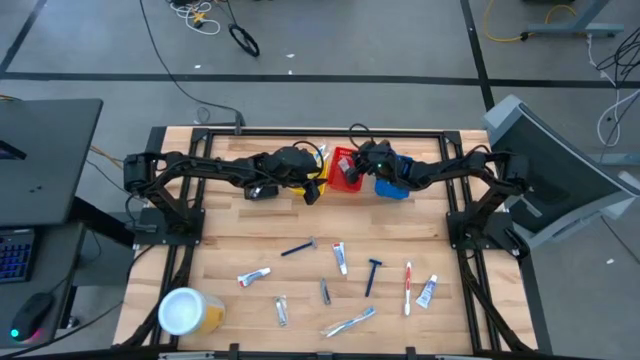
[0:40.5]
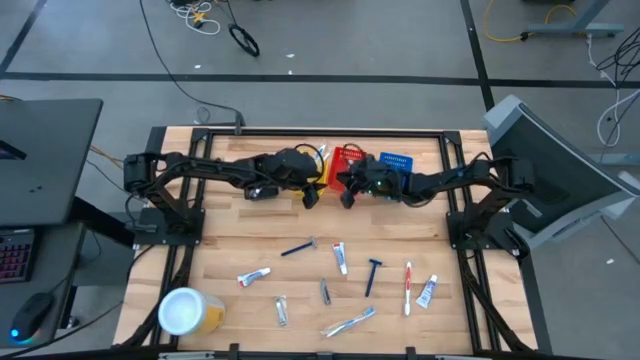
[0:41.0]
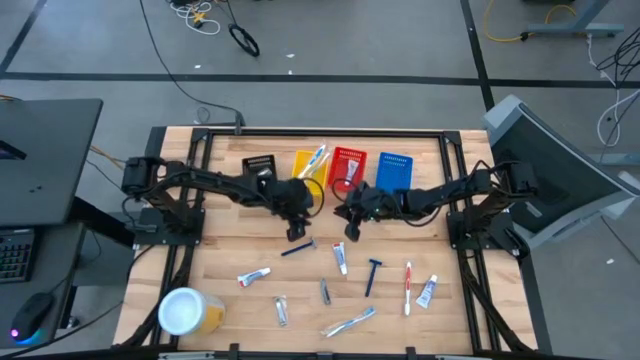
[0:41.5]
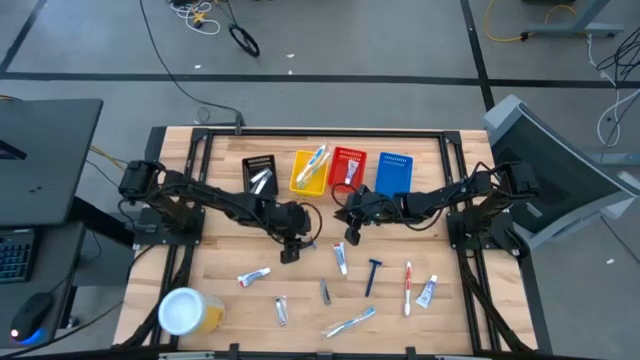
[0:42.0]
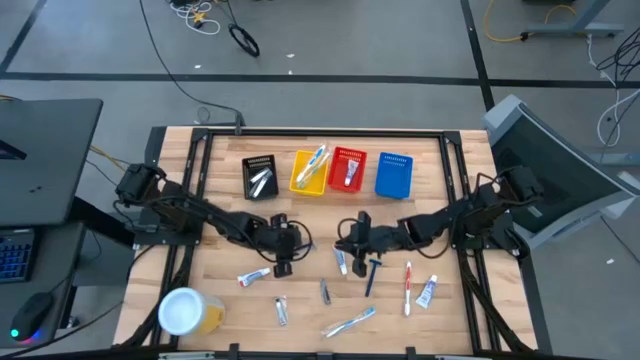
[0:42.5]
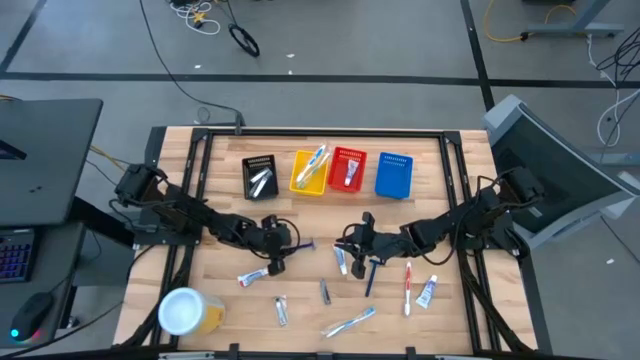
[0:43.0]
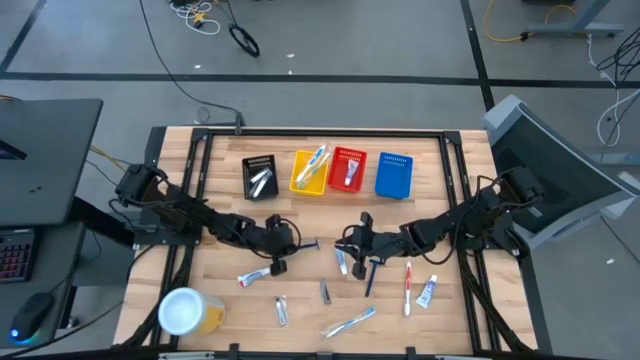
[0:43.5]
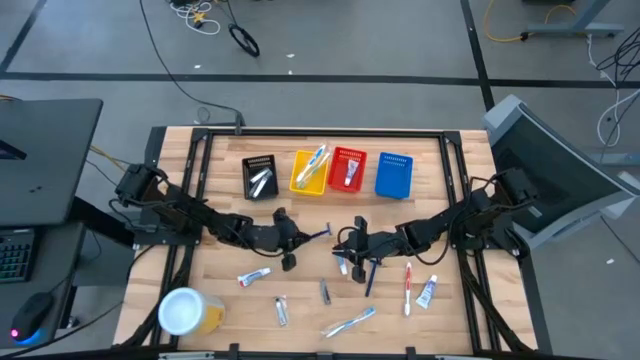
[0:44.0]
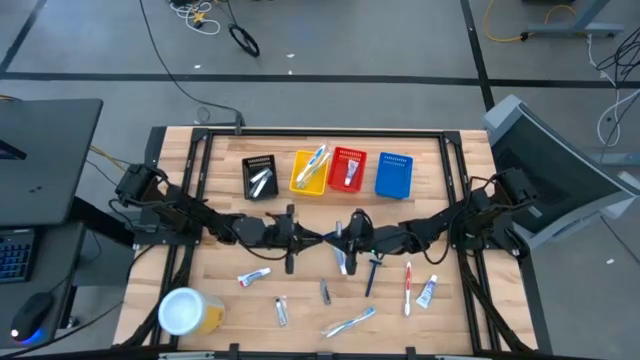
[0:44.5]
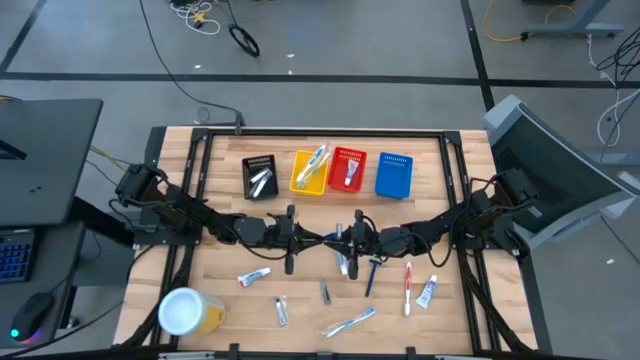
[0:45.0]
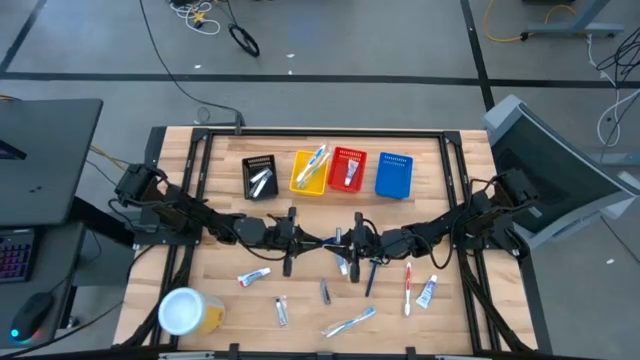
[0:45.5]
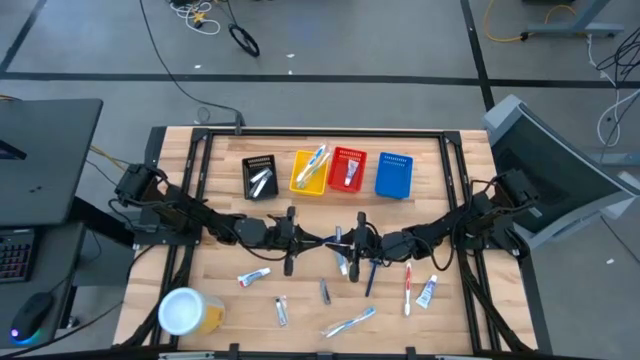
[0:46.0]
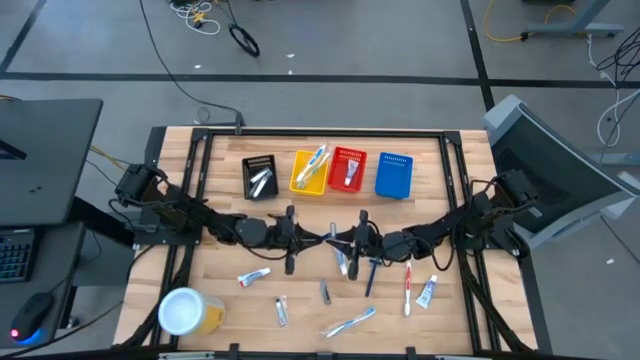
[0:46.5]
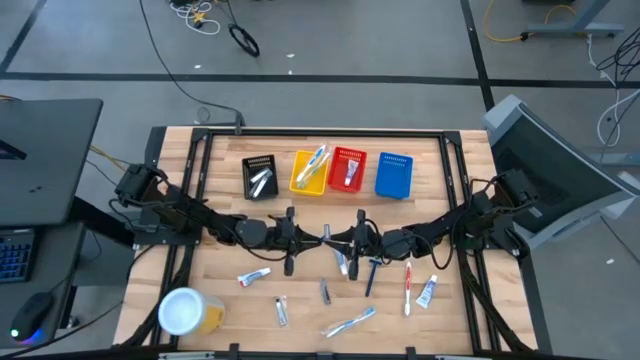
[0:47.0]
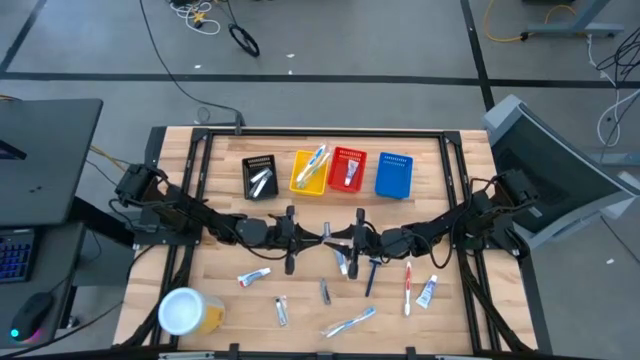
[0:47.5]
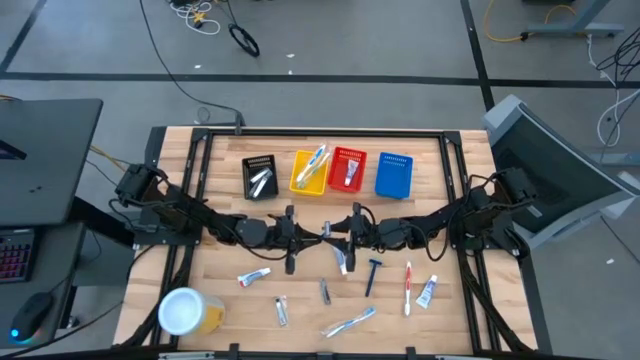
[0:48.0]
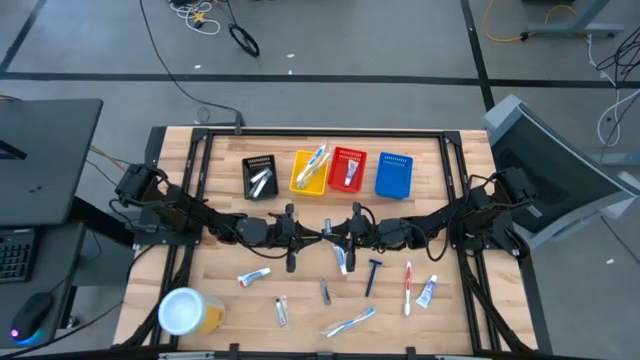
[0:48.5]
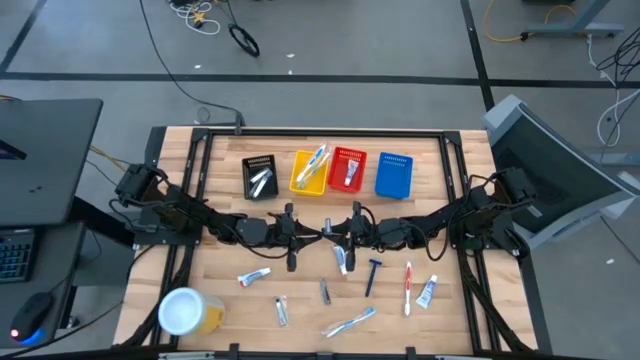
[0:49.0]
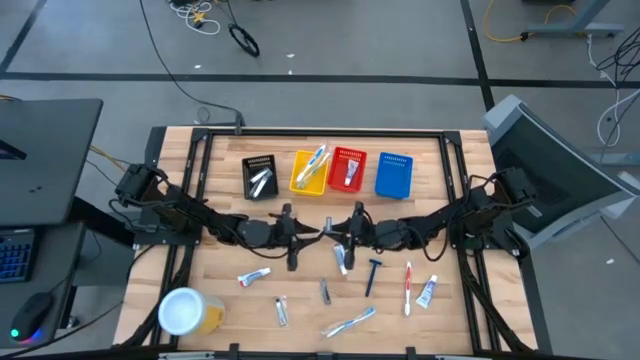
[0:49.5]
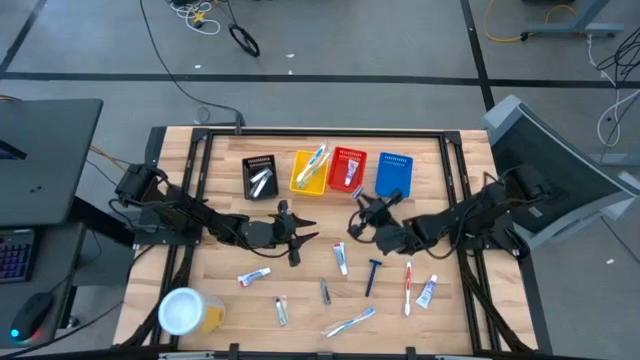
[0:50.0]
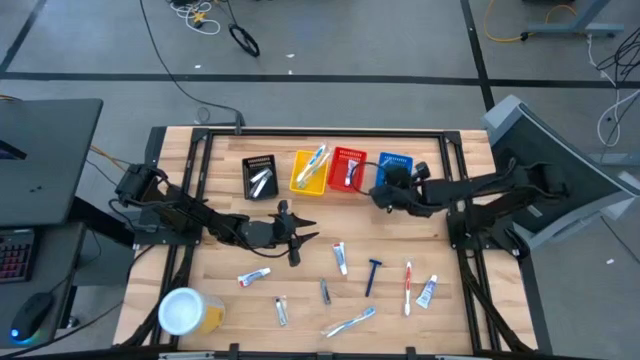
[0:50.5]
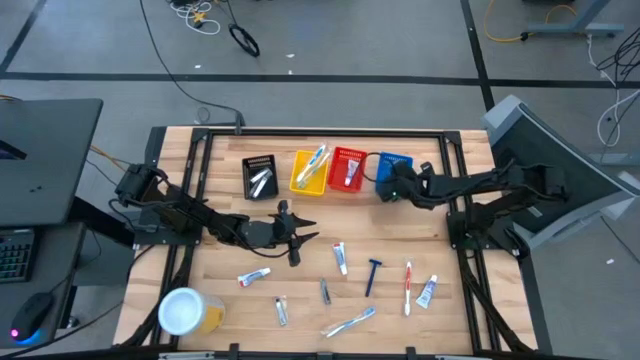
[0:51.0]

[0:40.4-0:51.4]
Task: Pick & Place Travel size toiletries
Put the blue razor into the blue bin

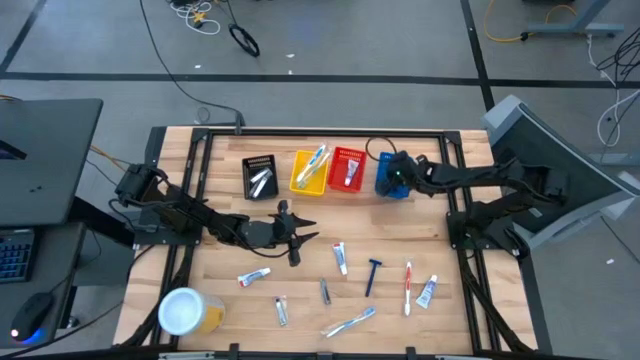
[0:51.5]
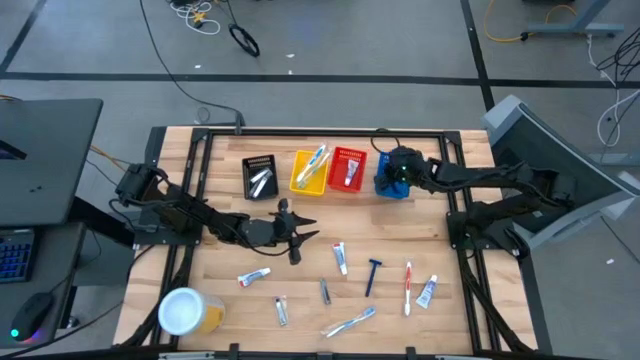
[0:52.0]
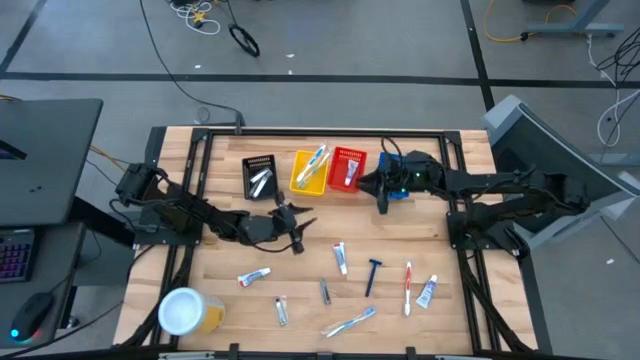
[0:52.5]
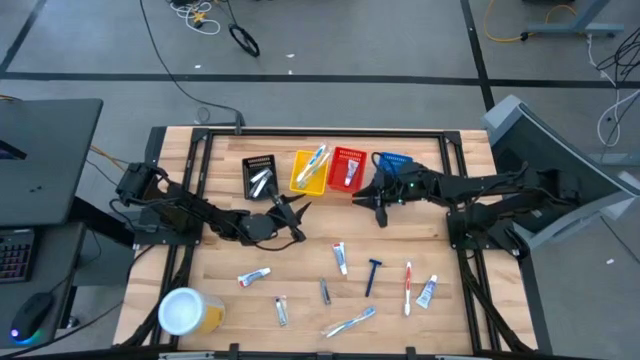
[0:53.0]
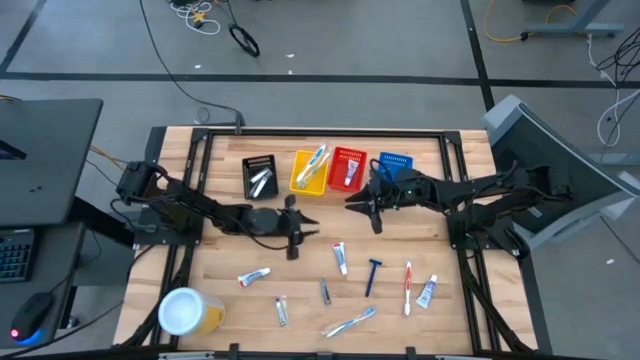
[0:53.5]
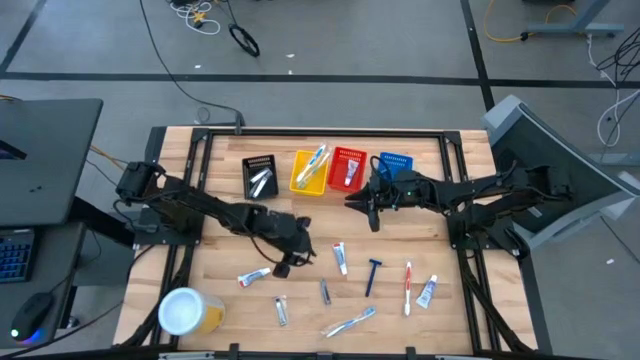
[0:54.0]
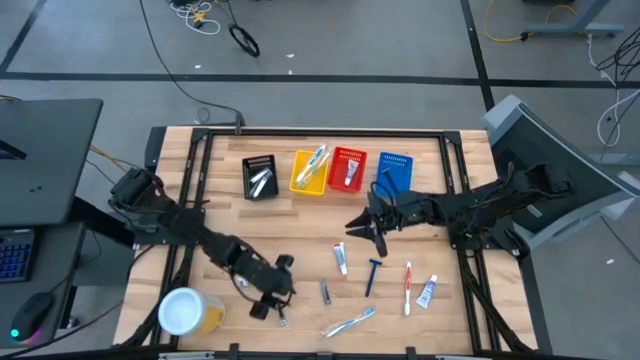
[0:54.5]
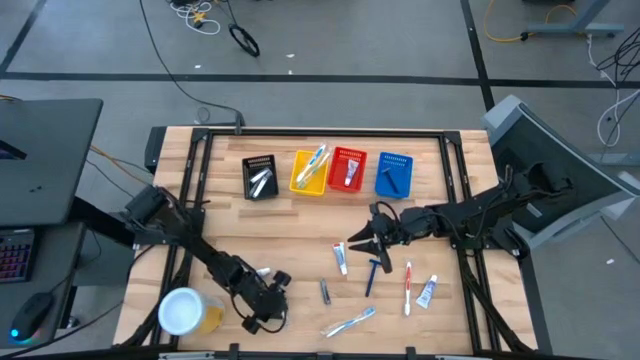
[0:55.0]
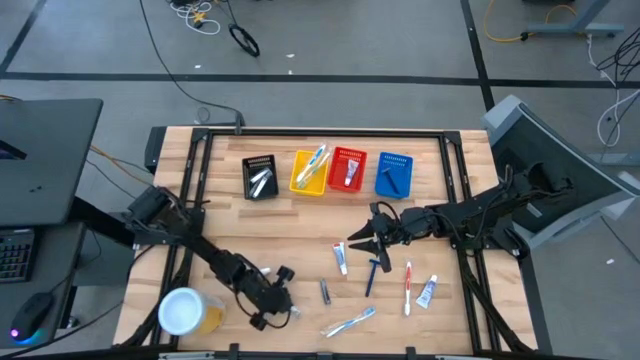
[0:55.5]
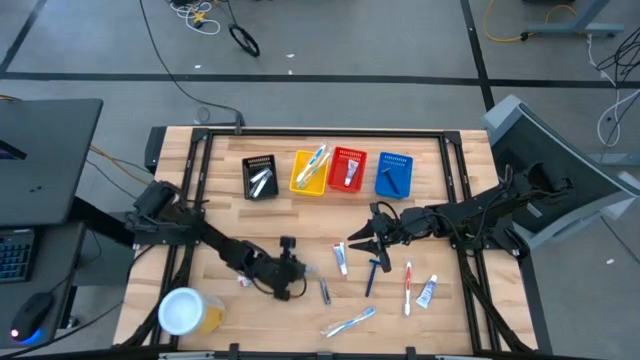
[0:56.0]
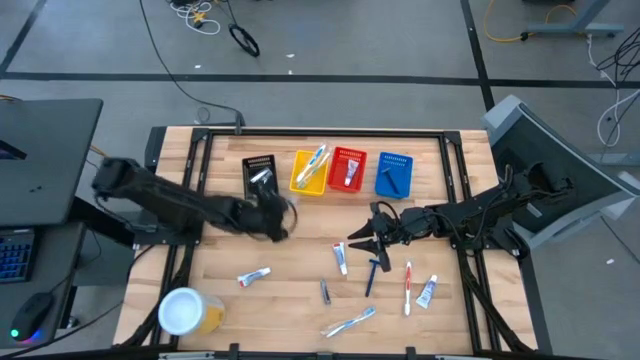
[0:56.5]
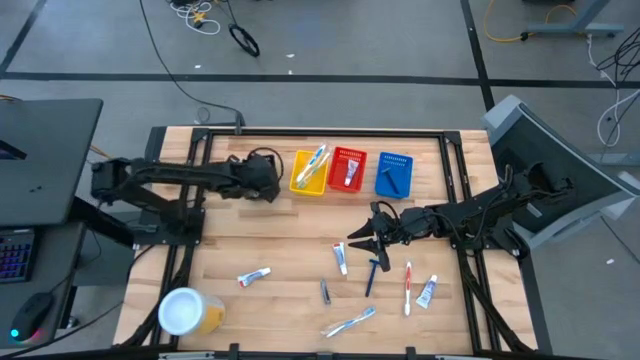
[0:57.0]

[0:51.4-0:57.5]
Put the silver nail cutter into the black bin

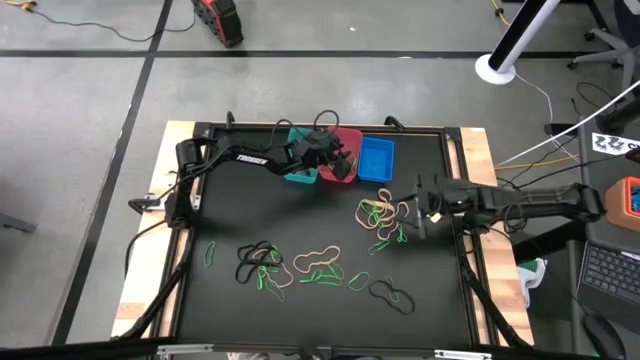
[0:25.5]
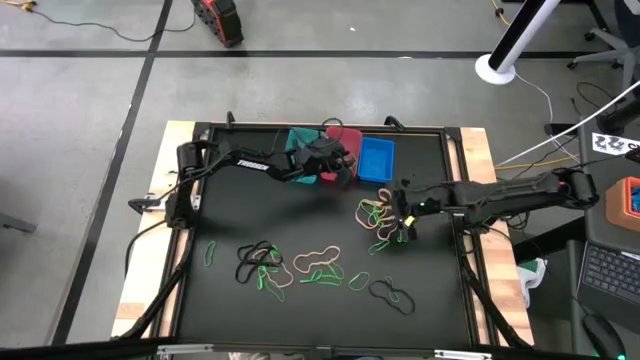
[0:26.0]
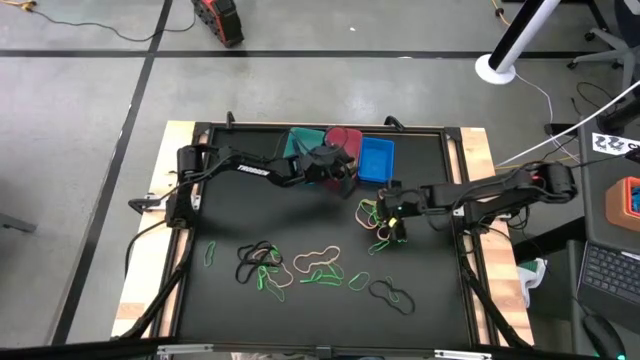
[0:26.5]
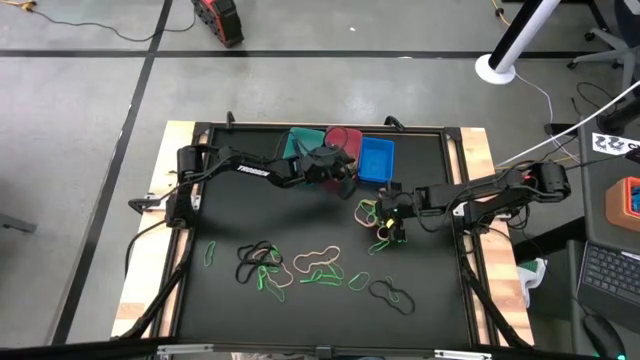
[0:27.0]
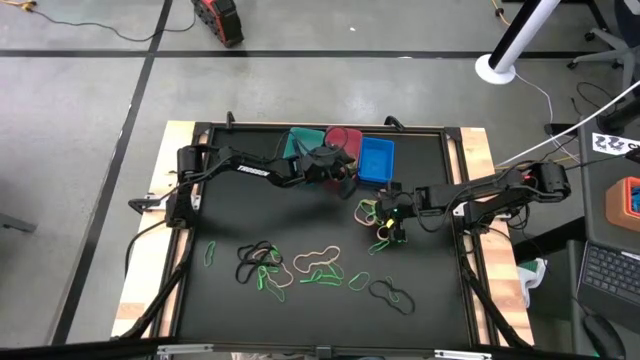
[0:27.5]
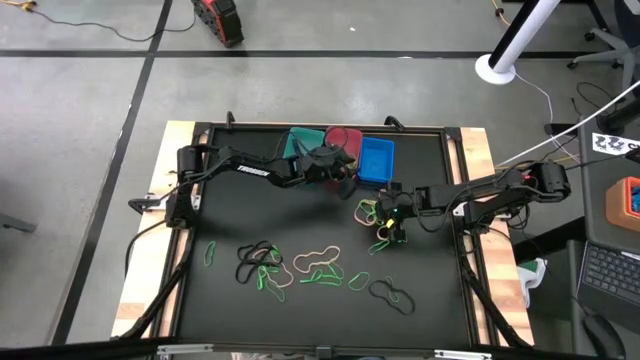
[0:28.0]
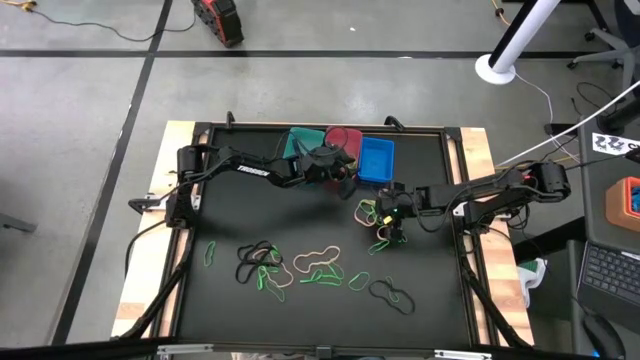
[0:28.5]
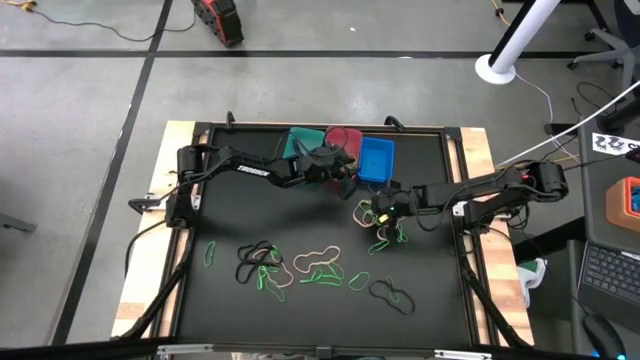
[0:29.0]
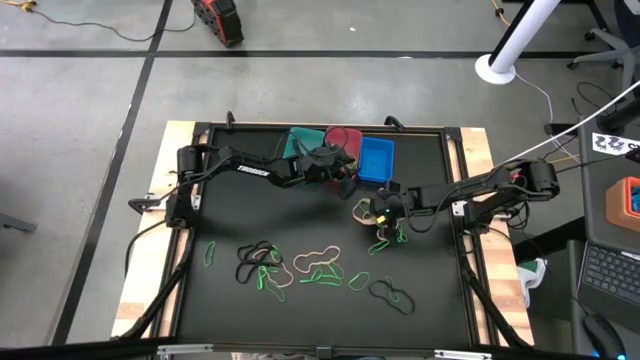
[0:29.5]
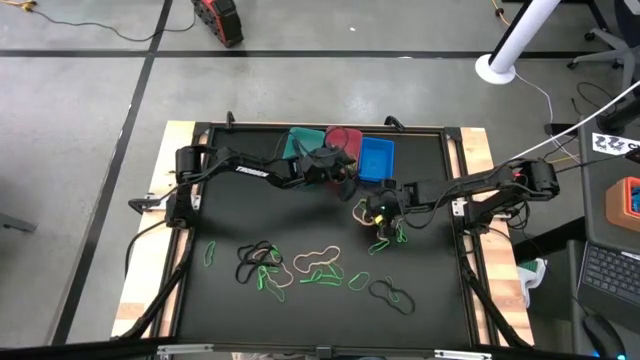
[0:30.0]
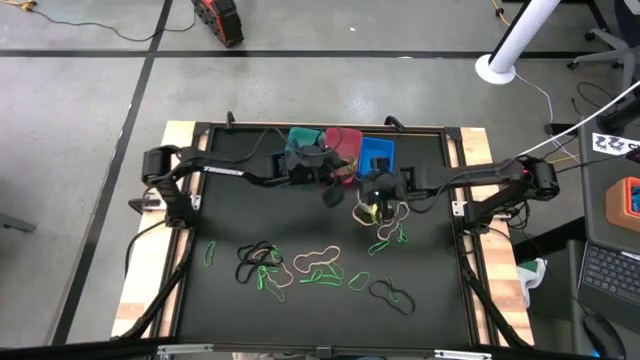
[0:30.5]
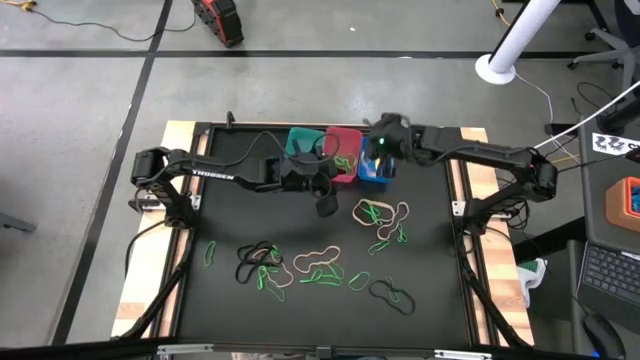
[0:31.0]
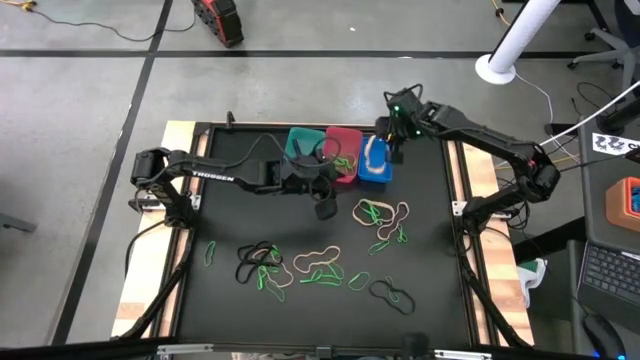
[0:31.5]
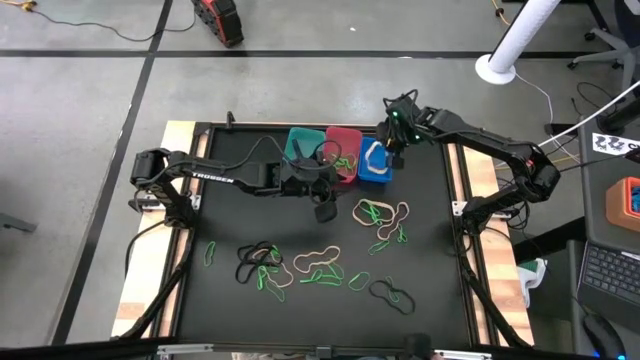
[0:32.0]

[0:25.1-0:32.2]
Task: Sort rubber bands into baskets
Put the brown rubber band into the blue bin
